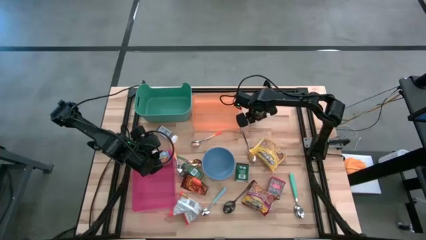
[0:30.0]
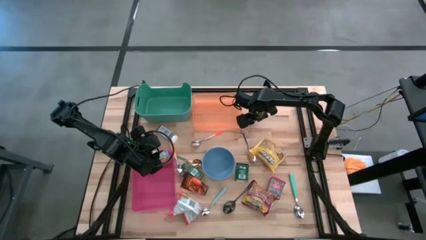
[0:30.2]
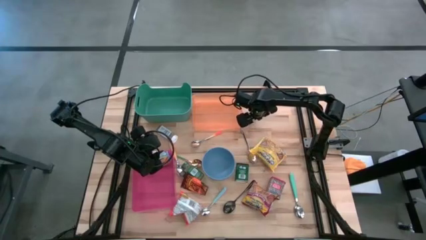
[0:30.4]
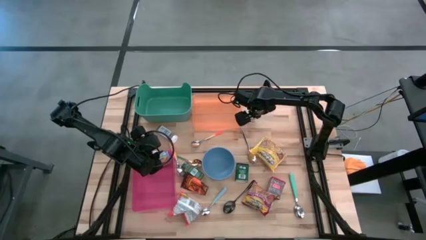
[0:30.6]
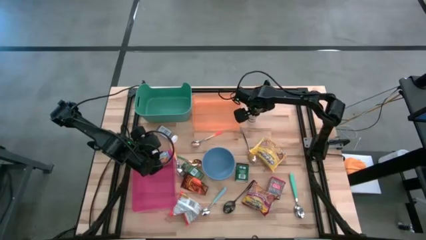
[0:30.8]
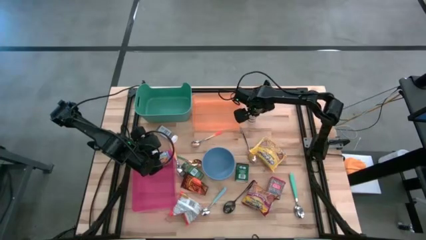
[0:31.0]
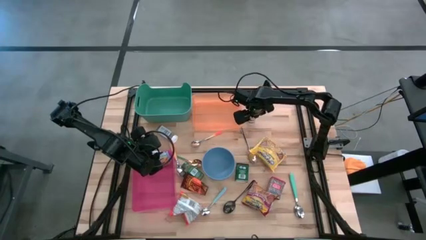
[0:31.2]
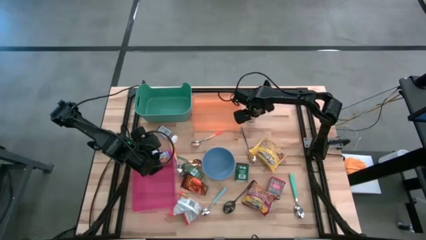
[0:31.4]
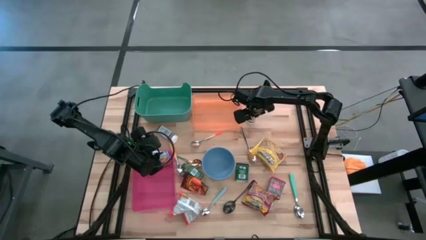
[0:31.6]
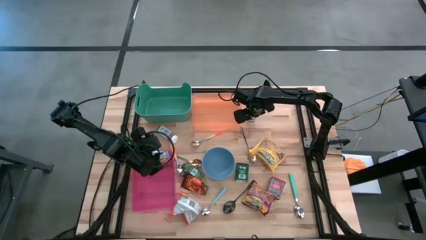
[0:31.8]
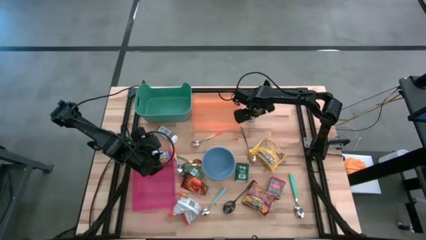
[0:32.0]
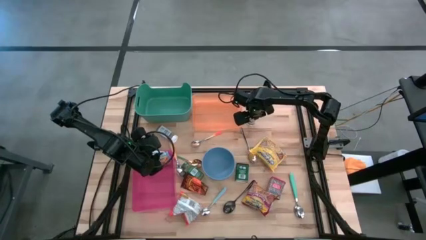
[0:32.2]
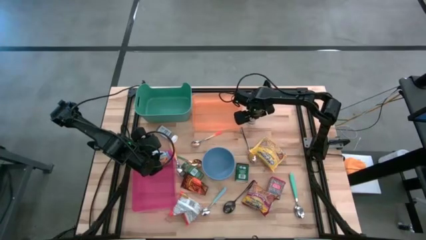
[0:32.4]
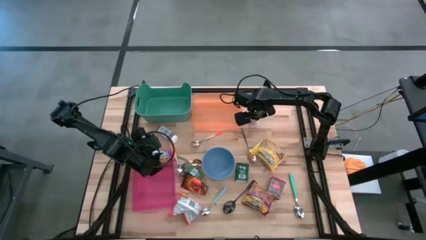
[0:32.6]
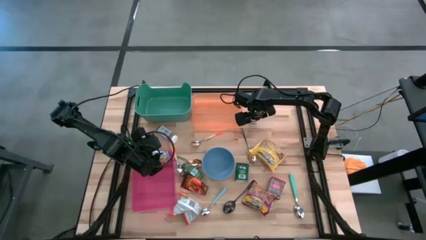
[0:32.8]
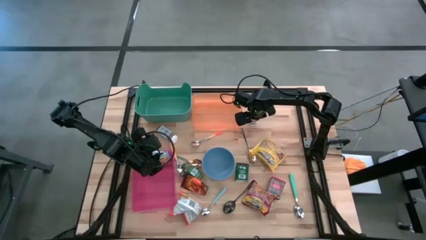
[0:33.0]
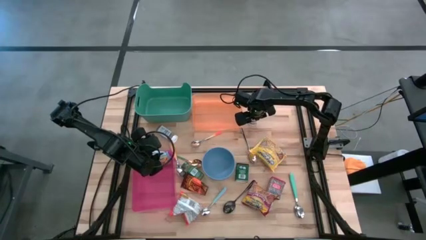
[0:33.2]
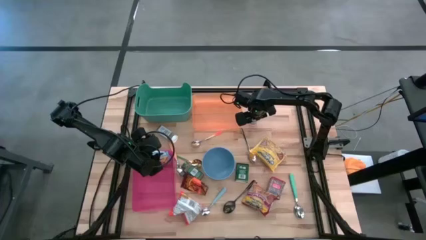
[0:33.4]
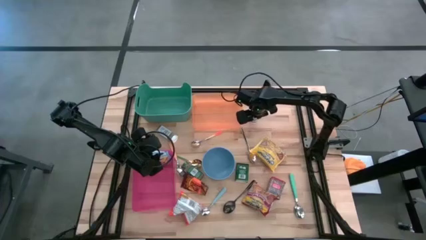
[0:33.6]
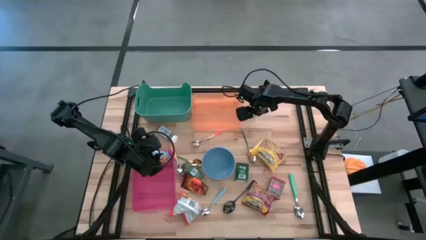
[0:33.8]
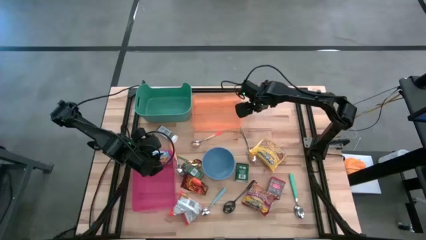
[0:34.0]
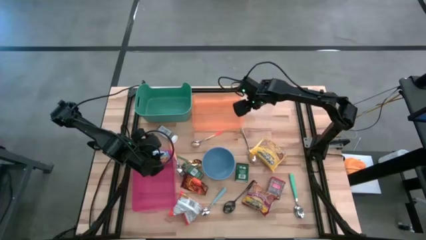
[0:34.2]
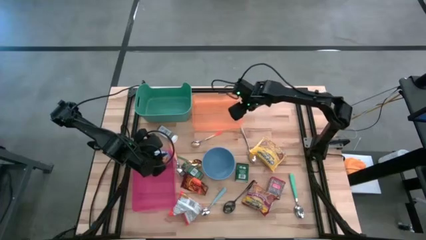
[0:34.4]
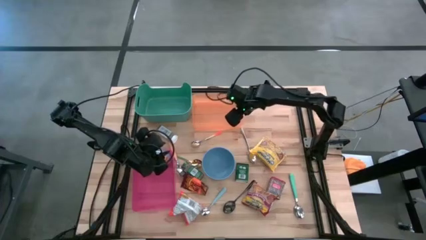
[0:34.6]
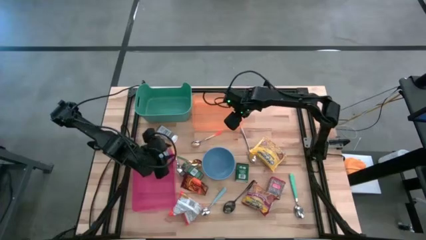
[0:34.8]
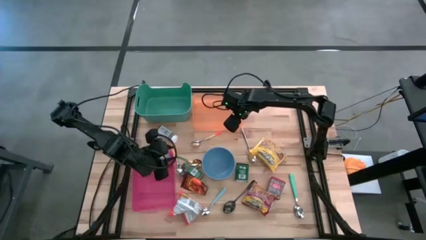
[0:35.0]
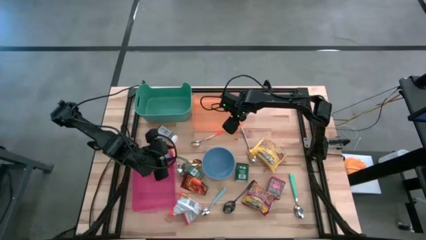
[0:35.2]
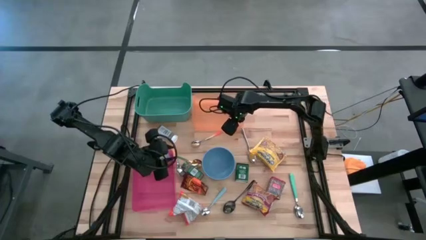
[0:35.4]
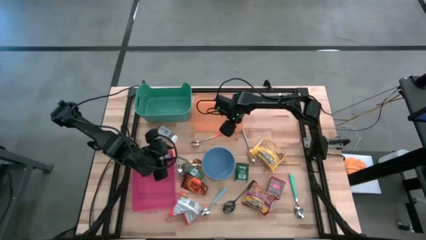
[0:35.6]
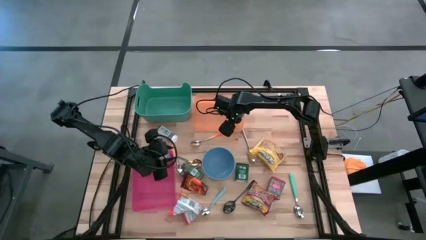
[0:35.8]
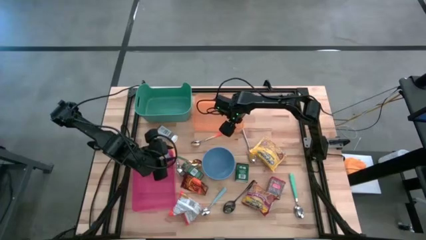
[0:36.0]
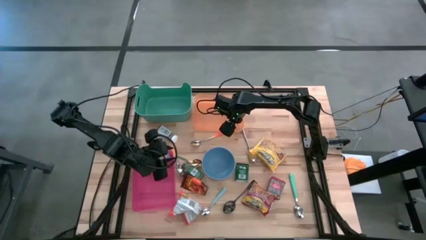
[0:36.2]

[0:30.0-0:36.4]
Put the brown spice bottle into the orange bin

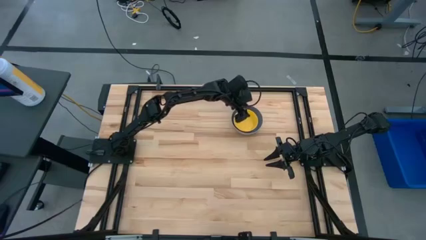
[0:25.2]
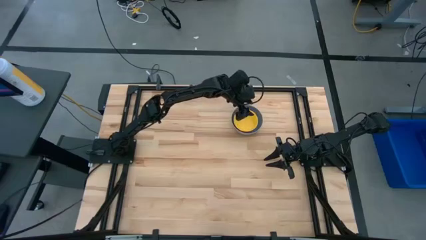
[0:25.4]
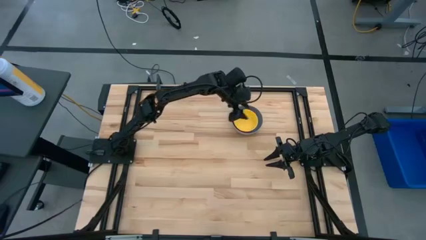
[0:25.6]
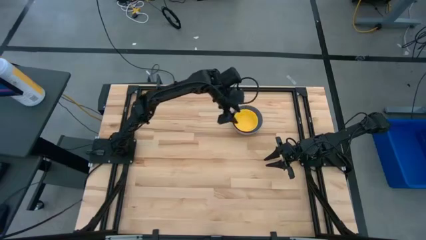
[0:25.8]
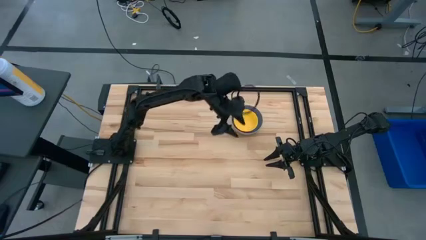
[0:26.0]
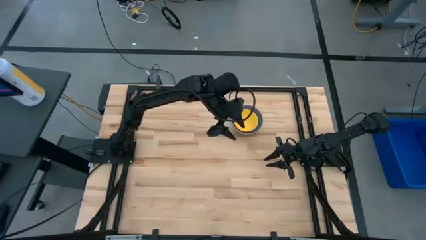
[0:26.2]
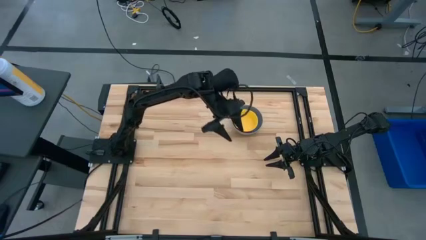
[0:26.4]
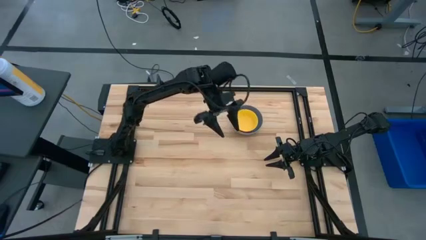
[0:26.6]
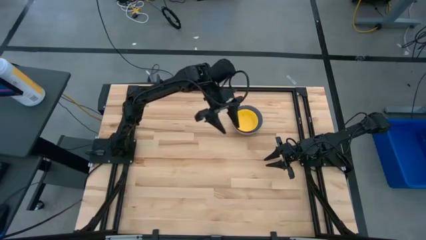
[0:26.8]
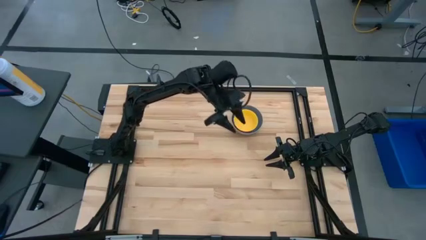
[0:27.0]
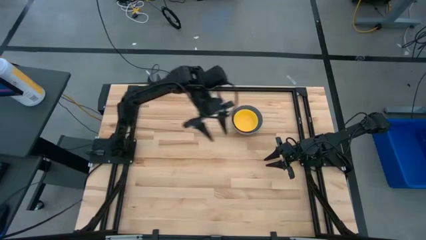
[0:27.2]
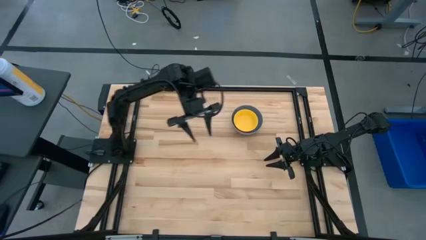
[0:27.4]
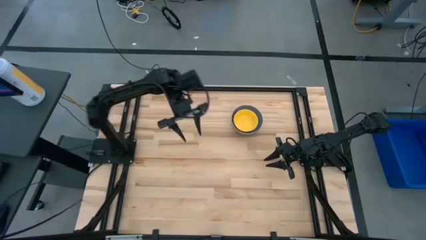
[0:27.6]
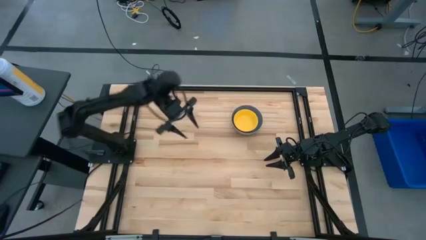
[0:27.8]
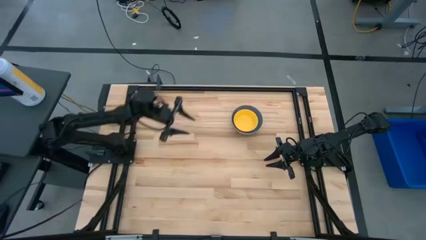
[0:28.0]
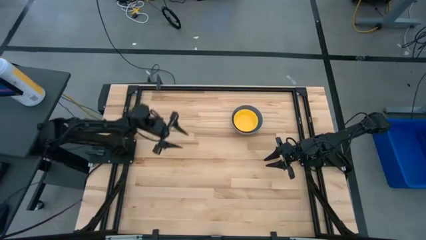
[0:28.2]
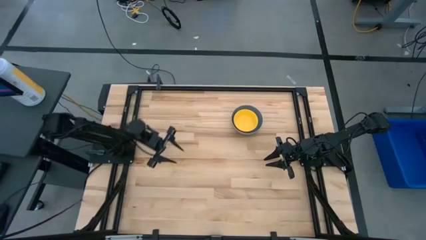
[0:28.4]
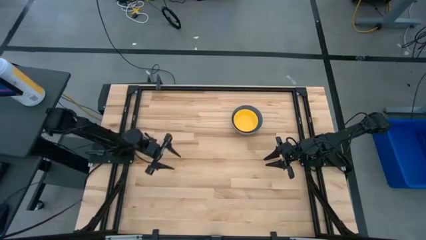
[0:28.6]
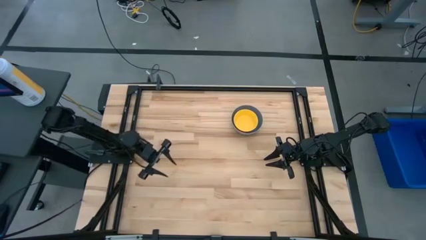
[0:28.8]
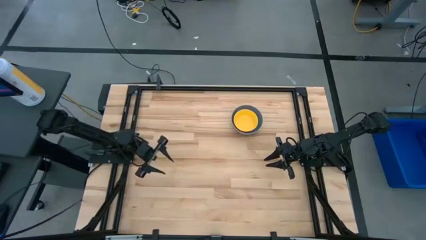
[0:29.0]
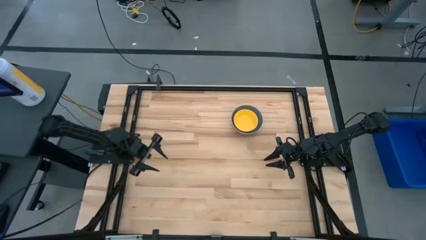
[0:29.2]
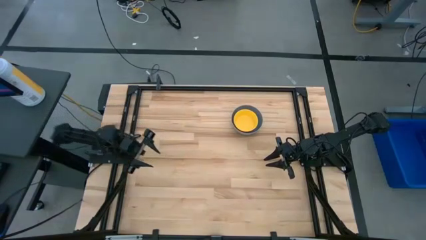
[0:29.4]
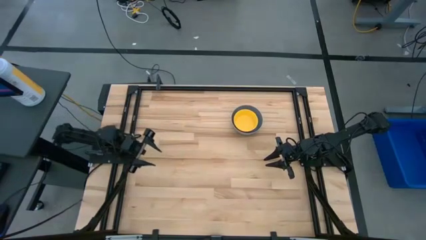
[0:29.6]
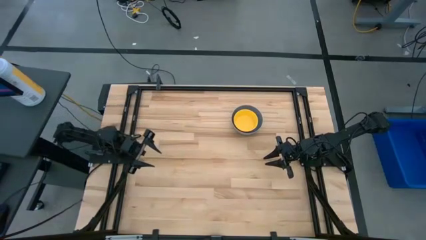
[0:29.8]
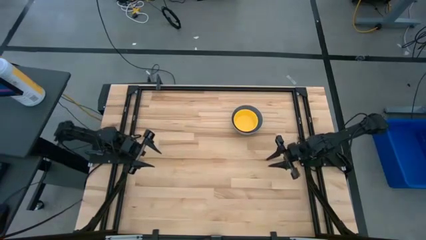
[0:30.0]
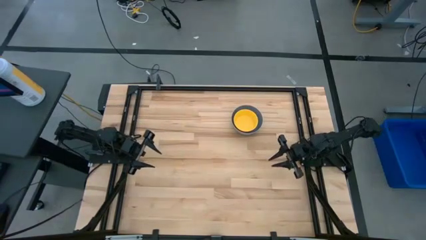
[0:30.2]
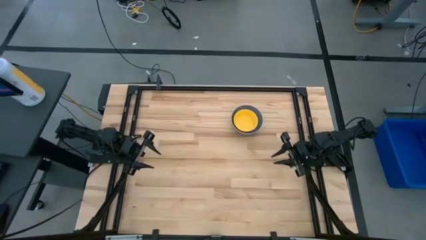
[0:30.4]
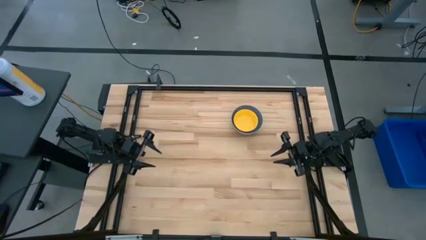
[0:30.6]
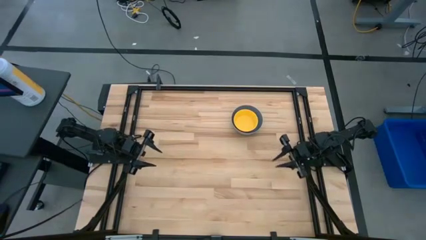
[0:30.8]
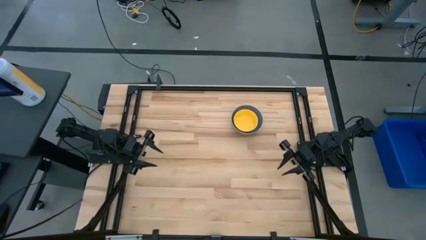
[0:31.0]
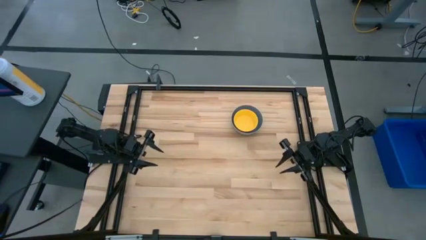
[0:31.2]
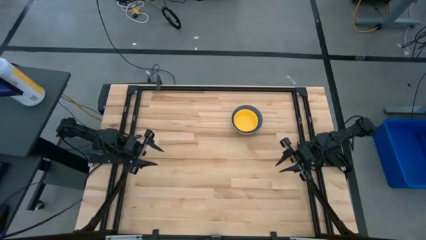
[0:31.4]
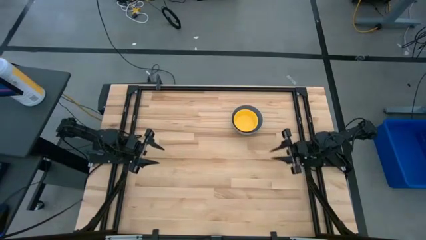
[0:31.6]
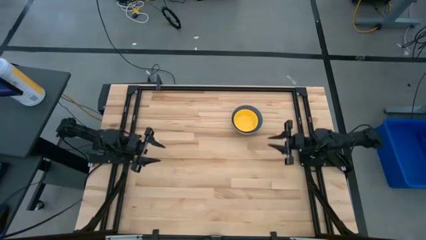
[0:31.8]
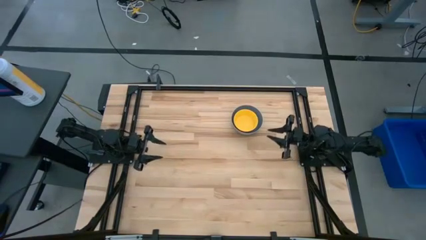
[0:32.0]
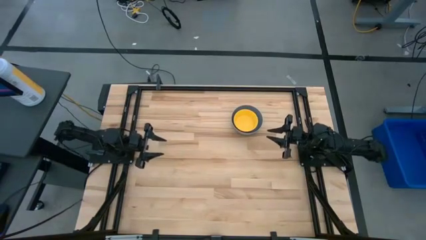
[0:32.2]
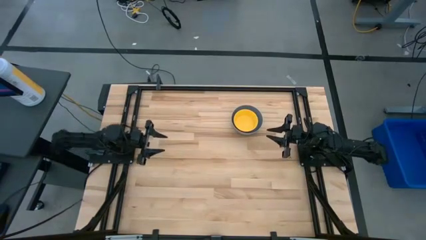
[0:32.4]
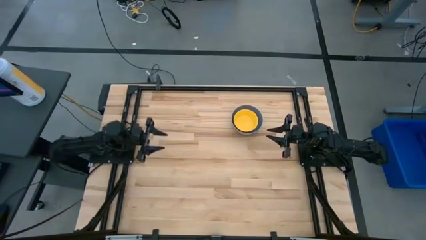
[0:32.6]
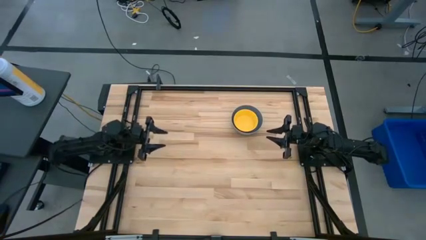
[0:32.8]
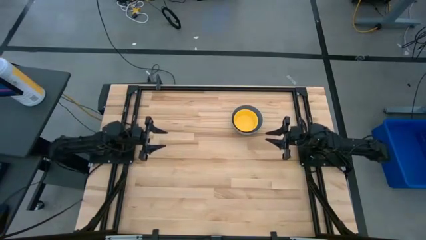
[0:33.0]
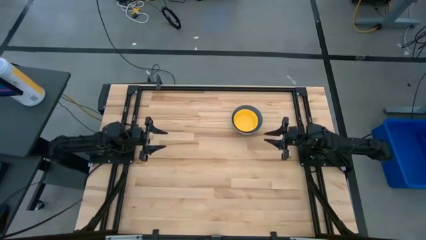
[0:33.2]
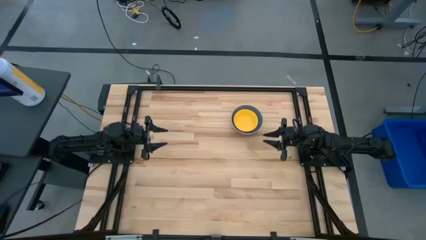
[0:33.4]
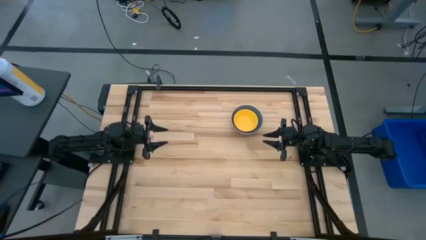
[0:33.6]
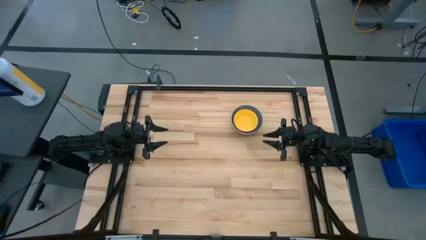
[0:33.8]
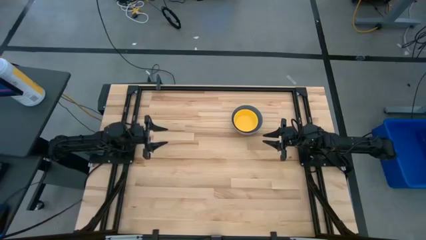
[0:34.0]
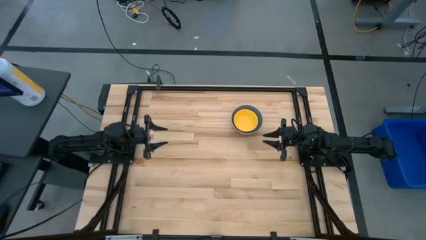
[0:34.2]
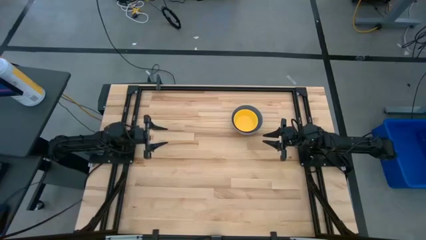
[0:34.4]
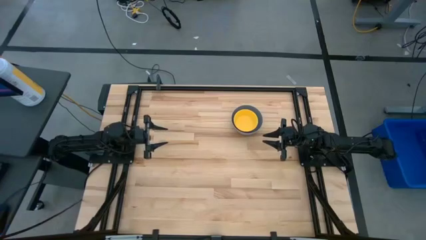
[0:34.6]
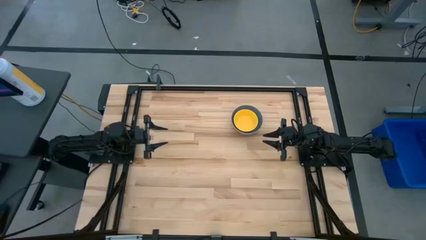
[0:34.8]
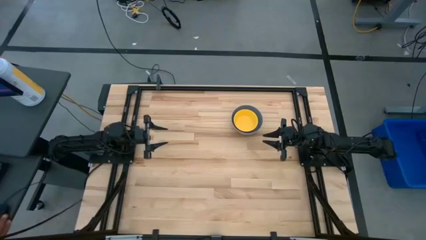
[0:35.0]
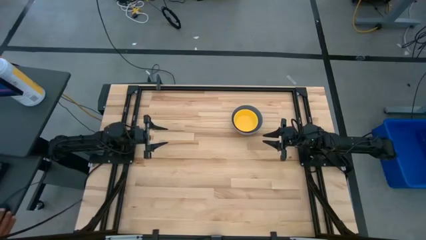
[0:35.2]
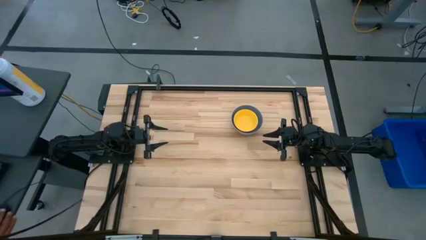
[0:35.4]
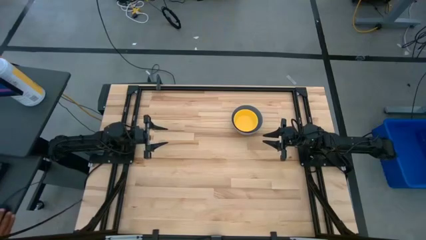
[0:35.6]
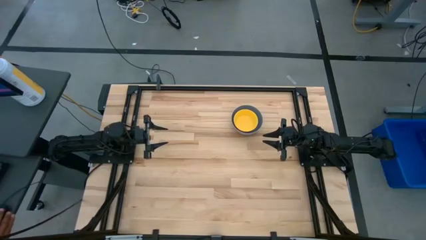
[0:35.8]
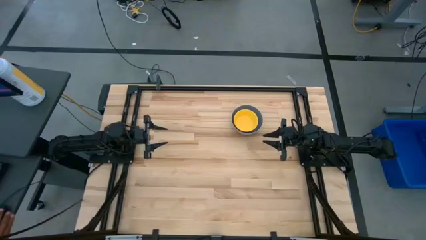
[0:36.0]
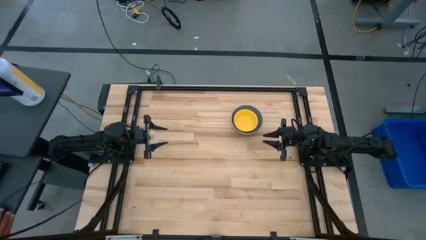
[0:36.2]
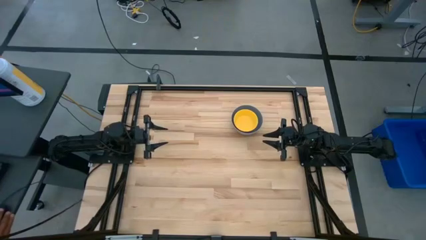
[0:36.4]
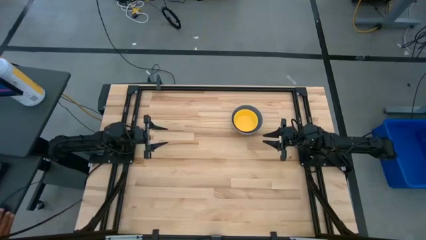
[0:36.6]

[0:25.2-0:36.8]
Return to Home Position
